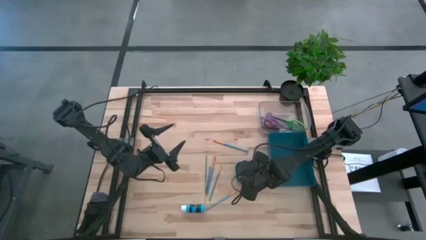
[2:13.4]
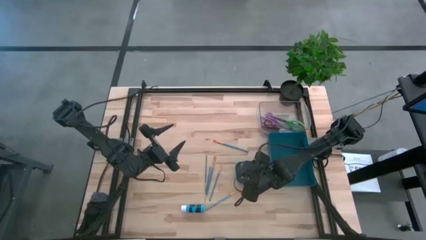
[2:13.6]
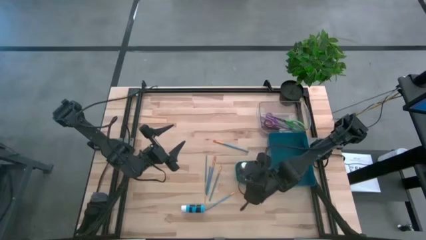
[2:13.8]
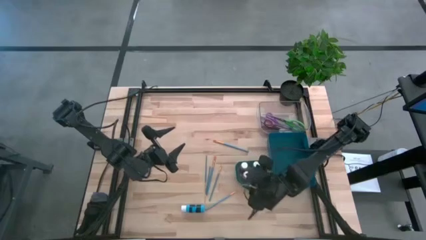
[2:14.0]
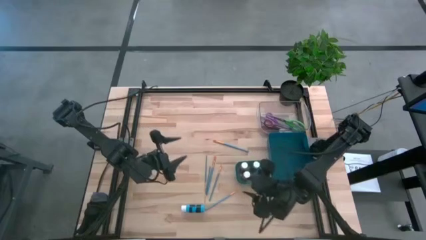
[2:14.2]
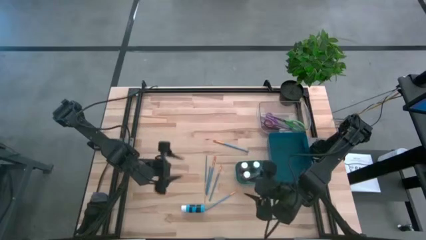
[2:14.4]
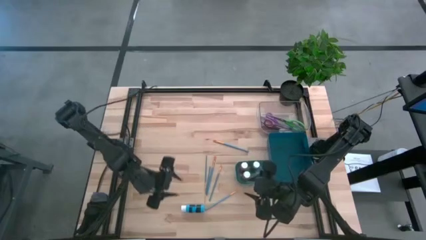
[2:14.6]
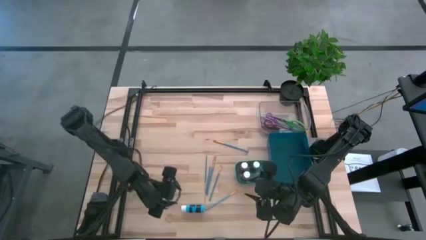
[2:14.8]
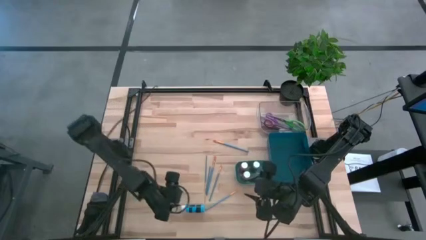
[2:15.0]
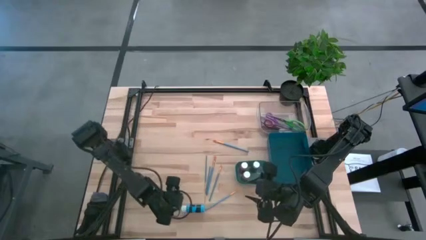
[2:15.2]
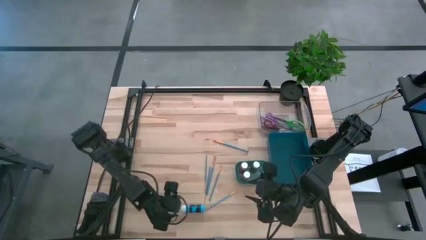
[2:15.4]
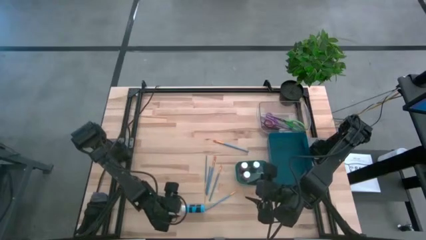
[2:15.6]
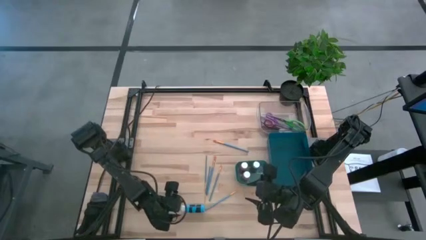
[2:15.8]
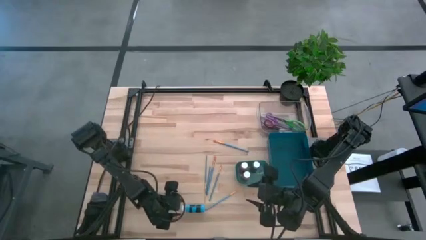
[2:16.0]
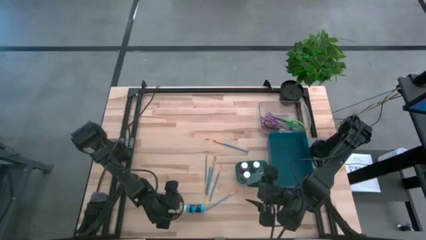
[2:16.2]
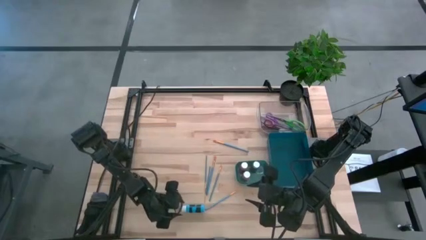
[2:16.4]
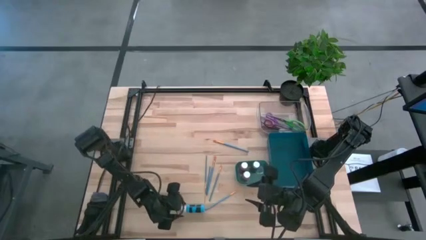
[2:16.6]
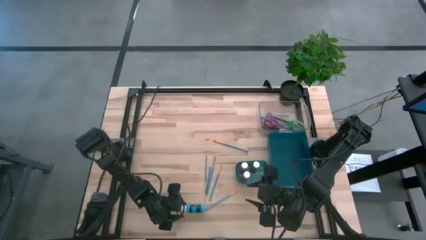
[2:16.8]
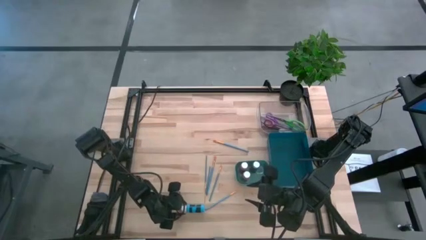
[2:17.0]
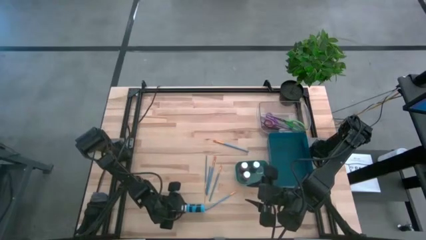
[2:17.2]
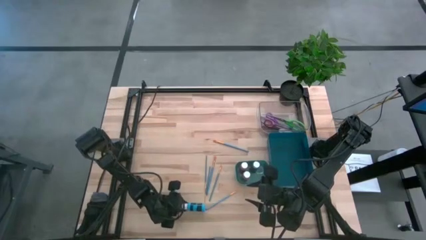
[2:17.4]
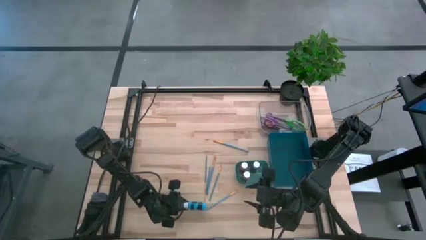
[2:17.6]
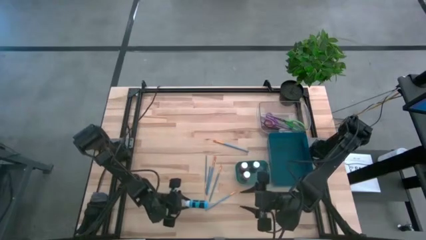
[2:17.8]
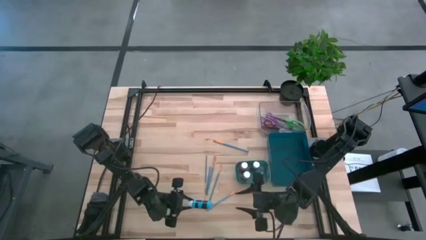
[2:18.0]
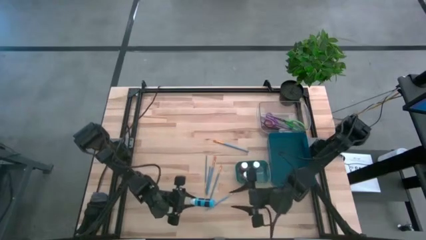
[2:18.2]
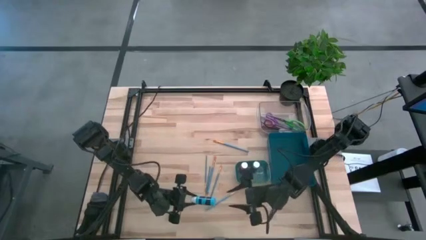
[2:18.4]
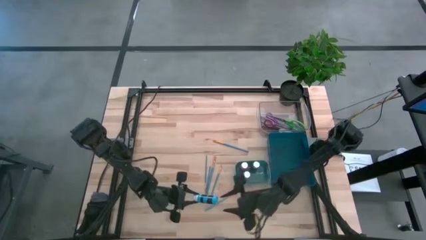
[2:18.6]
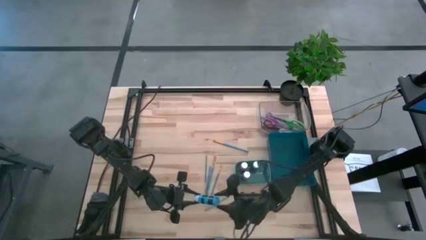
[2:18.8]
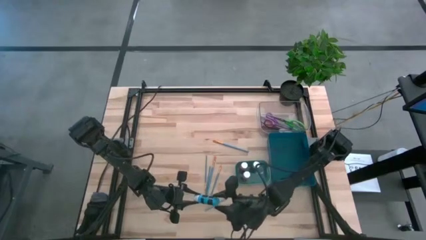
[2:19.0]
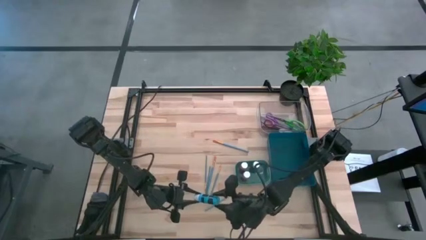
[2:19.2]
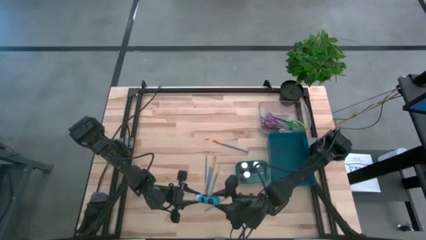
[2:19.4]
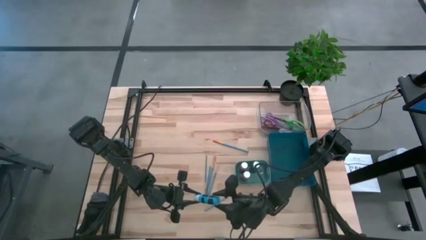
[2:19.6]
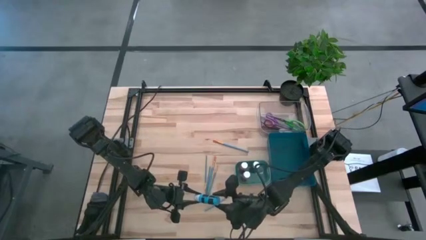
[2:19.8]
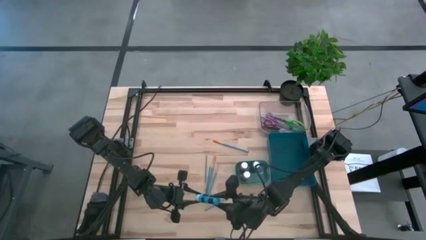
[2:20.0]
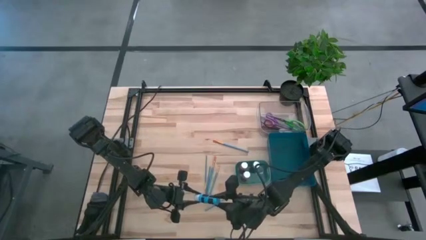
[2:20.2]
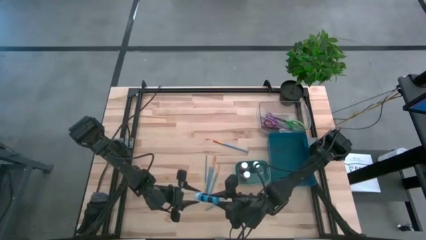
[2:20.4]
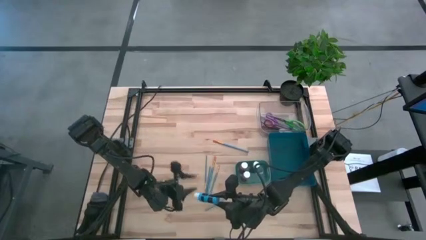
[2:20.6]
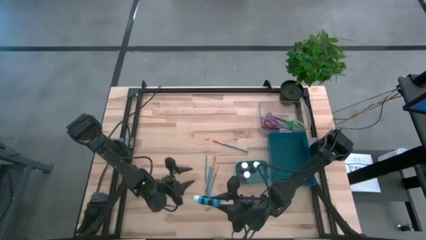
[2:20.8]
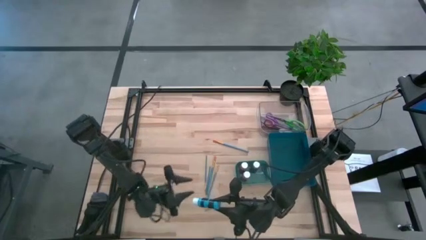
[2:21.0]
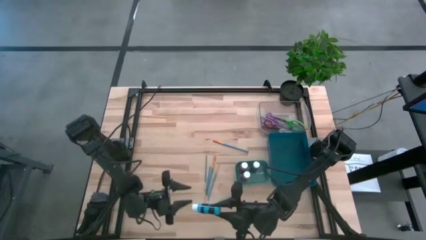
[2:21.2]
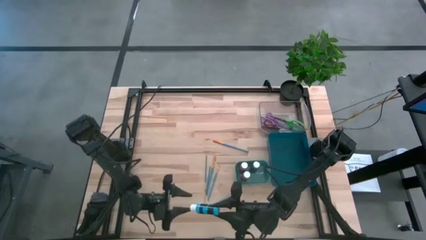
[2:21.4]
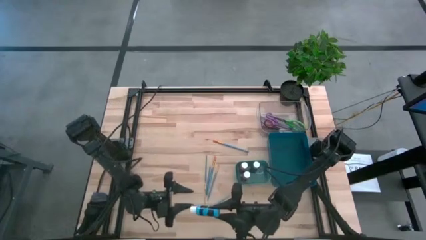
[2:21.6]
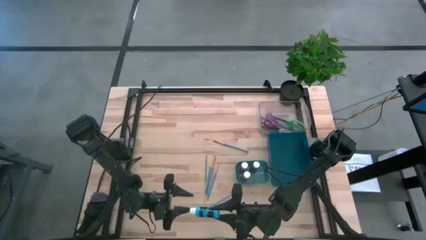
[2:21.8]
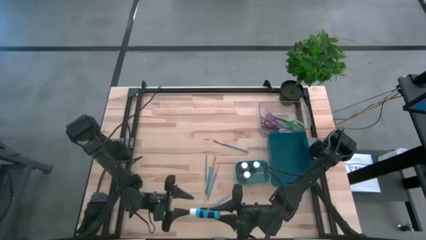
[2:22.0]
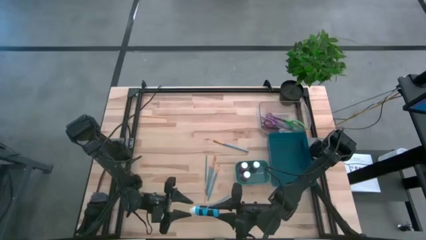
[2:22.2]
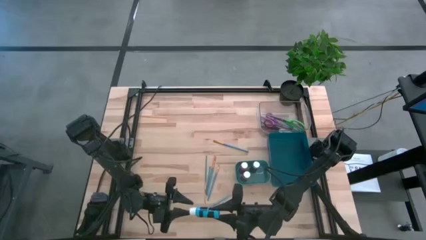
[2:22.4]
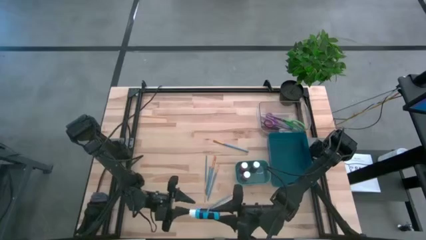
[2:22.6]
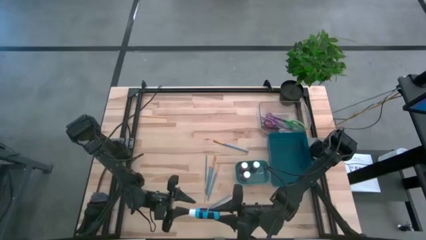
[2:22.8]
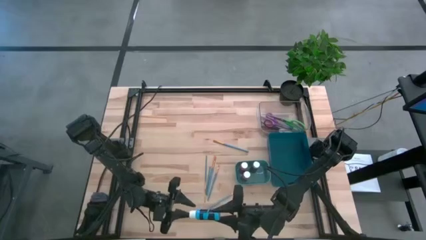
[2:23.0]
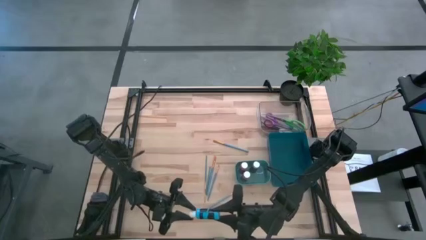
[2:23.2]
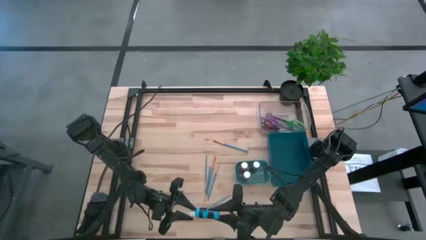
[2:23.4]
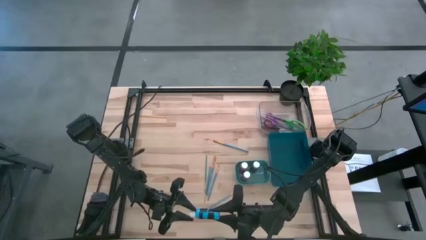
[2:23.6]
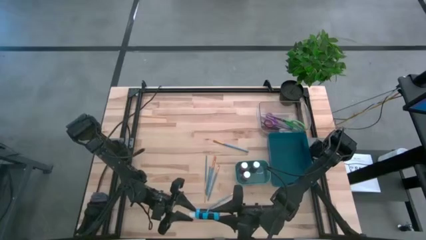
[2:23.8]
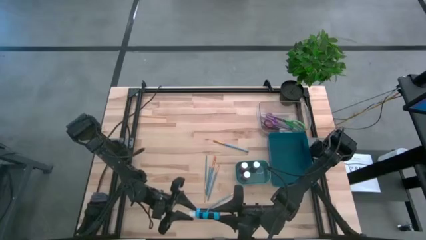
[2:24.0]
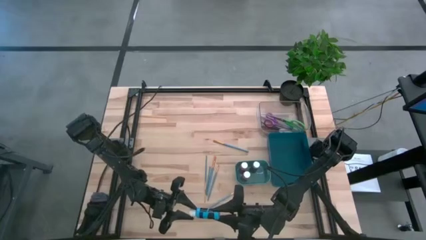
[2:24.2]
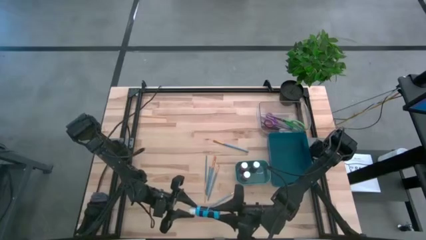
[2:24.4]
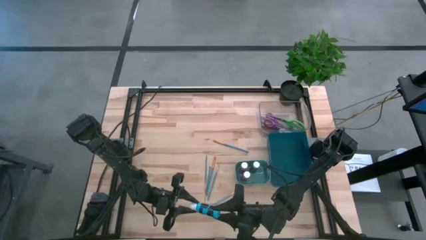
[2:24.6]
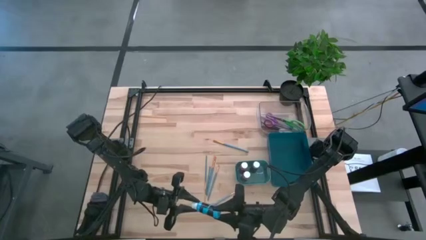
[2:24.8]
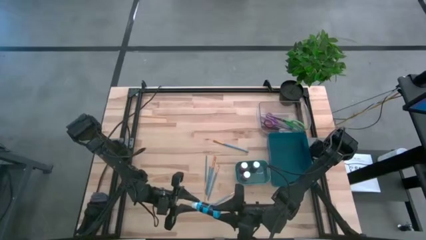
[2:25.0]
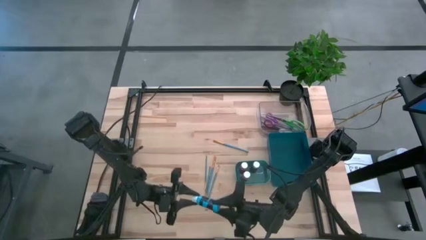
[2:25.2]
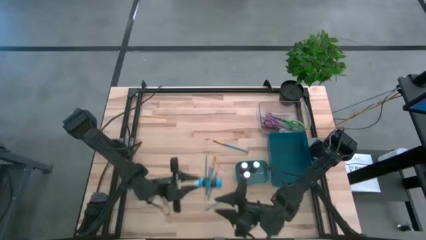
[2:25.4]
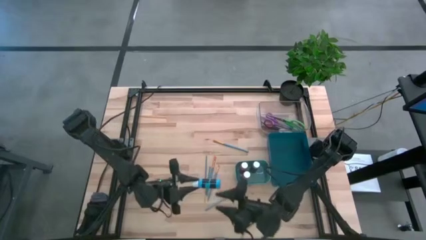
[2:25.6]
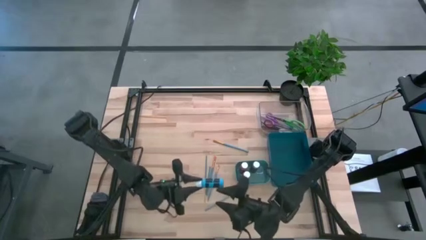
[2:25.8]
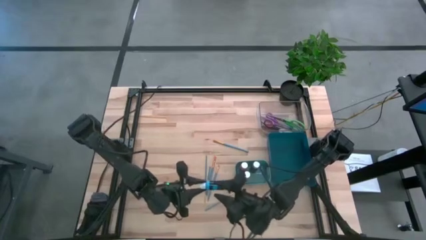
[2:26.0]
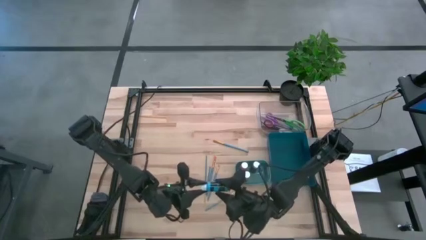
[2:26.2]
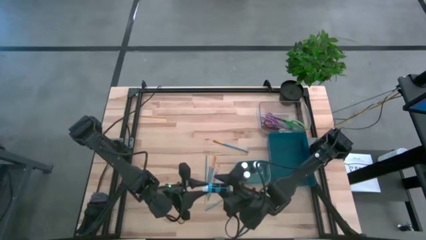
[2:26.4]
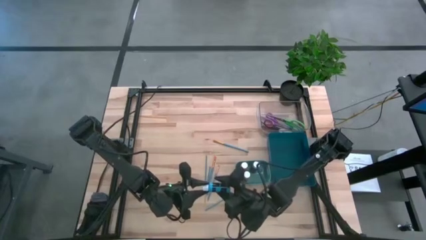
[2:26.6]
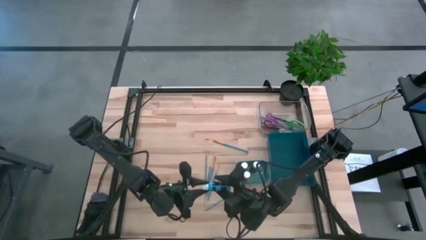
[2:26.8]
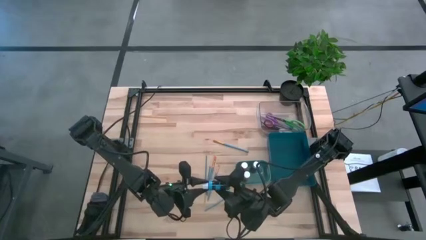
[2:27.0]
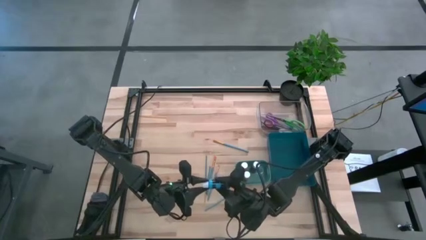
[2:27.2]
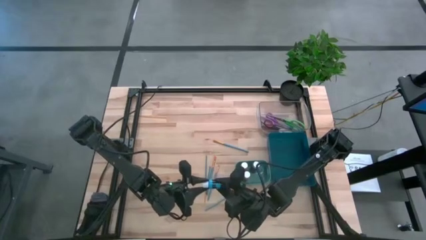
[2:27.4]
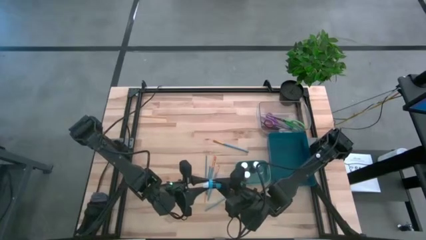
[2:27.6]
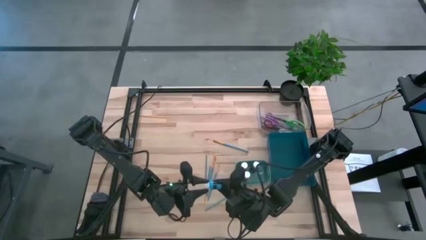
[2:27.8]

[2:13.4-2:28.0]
Task: Pick & Place Paint Supplies
Put the blue paint bottle into the green bin

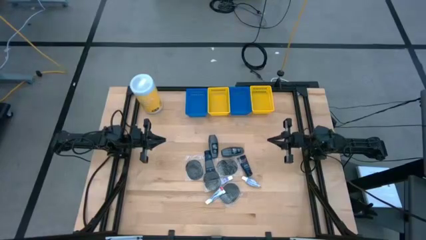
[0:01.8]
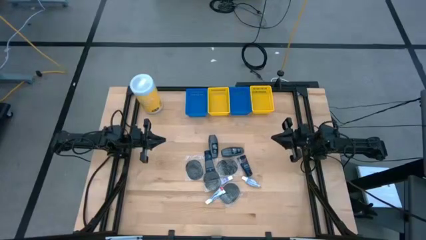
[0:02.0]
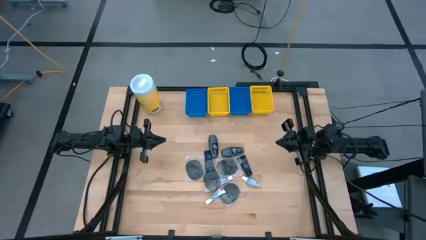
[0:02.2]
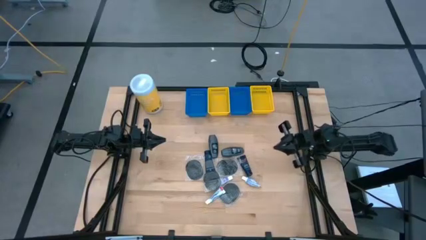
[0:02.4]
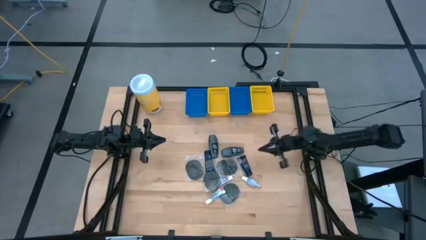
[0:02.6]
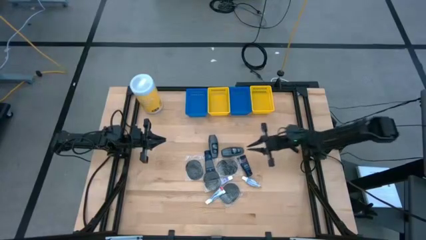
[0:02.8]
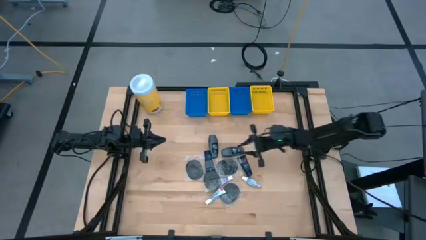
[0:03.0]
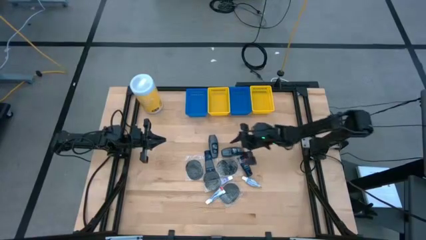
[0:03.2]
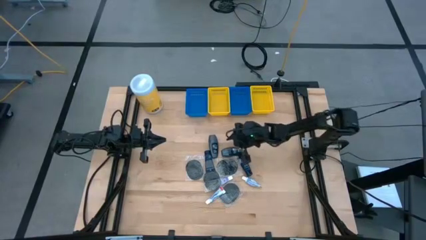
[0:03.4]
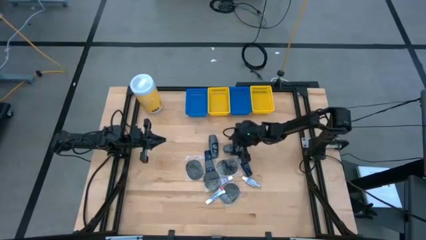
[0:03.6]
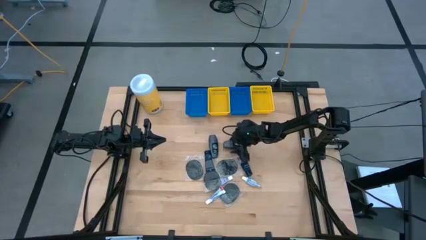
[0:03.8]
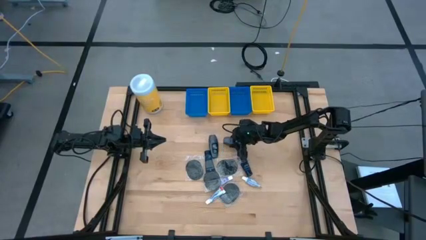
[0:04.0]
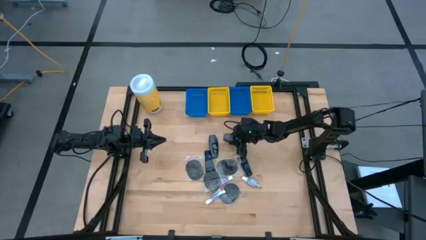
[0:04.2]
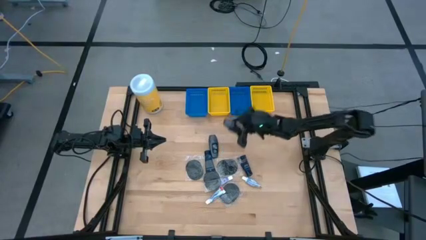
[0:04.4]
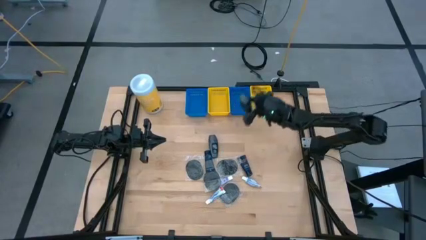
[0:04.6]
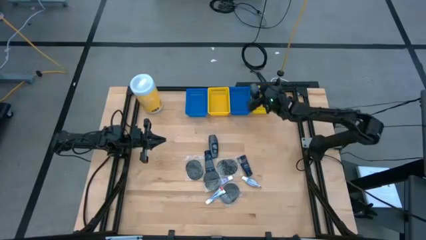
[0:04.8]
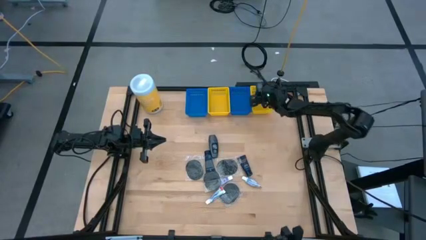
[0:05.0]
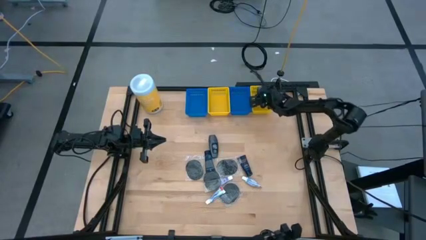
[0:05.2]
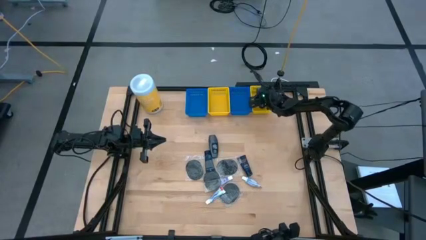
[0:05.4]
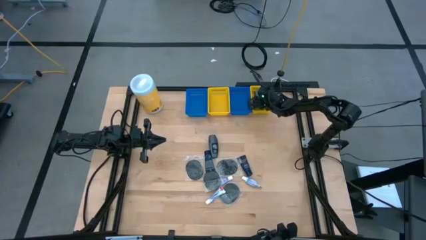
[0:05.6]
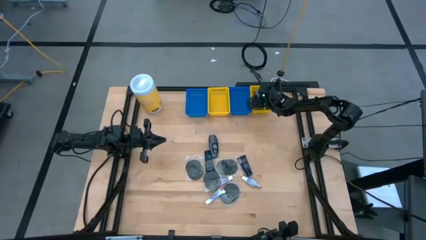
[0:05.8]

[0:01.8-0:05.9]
Task: Pick & Place Travel size toiletries
Put the gray deodorant into the right yellow bin
